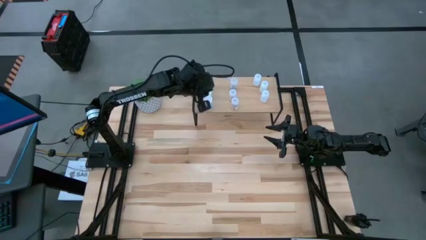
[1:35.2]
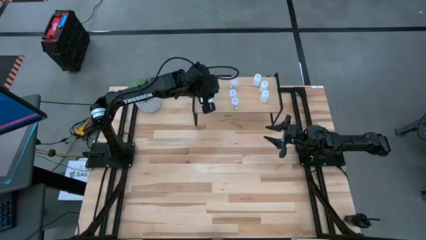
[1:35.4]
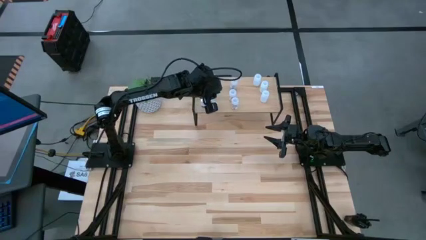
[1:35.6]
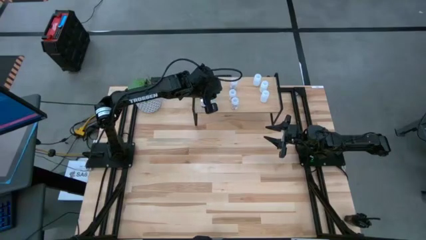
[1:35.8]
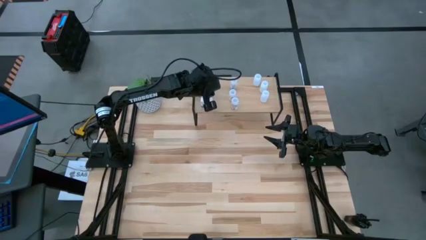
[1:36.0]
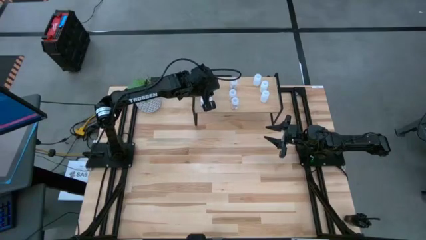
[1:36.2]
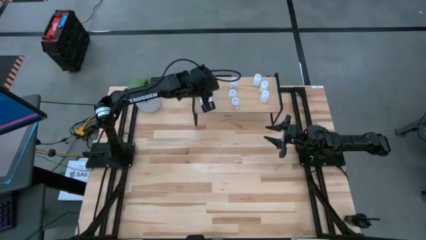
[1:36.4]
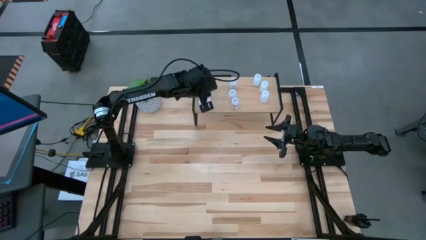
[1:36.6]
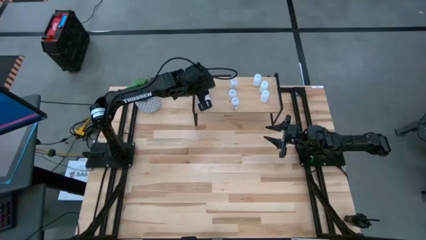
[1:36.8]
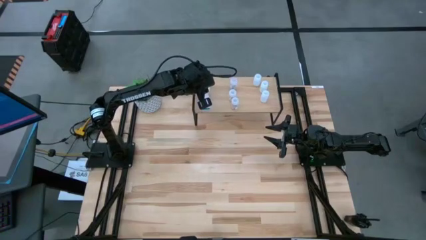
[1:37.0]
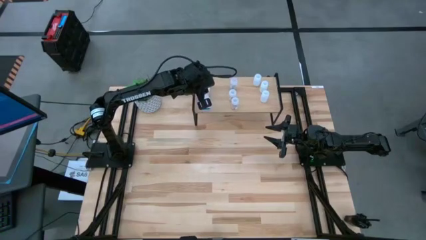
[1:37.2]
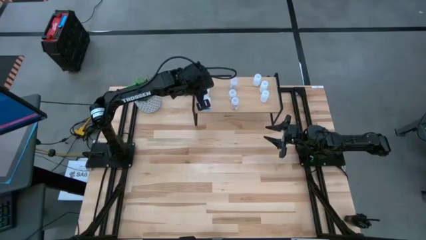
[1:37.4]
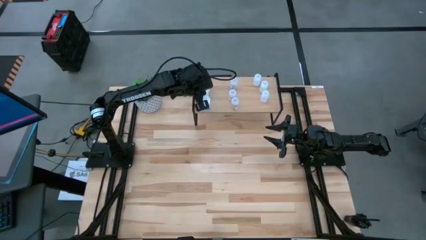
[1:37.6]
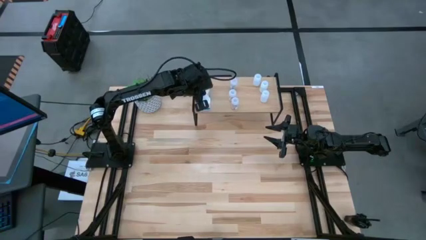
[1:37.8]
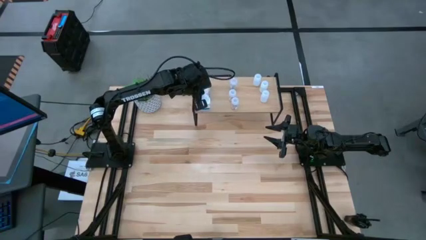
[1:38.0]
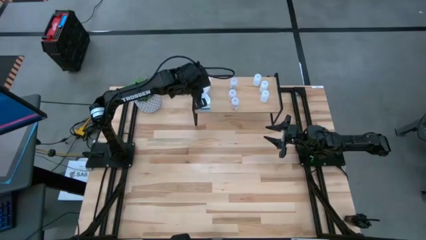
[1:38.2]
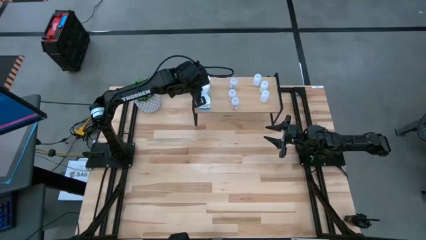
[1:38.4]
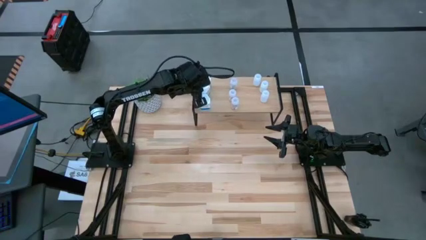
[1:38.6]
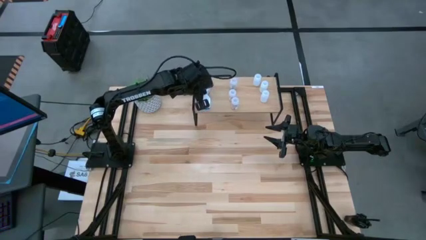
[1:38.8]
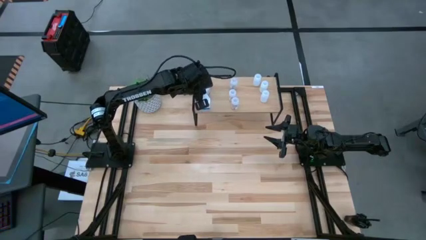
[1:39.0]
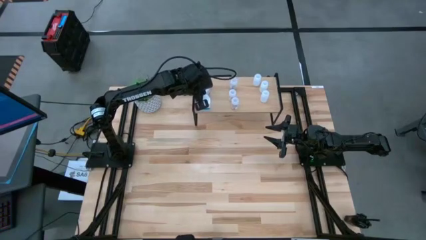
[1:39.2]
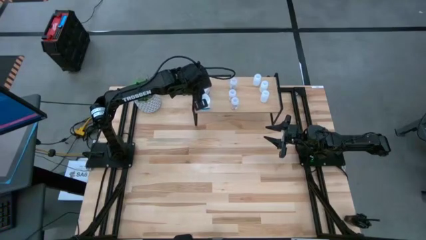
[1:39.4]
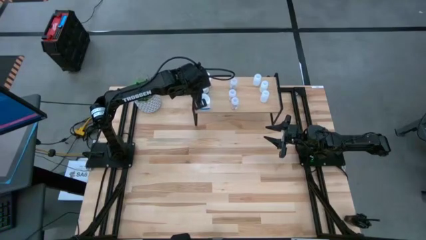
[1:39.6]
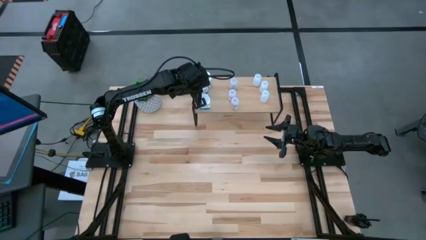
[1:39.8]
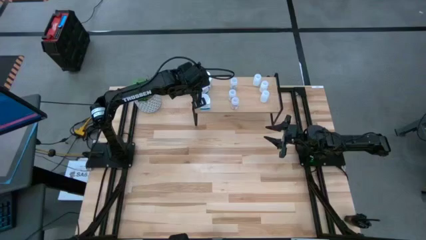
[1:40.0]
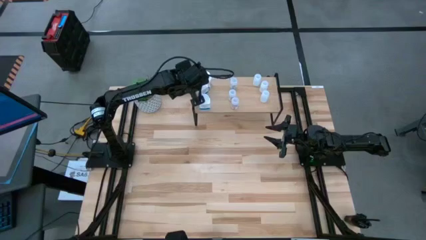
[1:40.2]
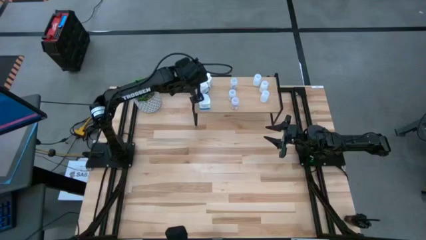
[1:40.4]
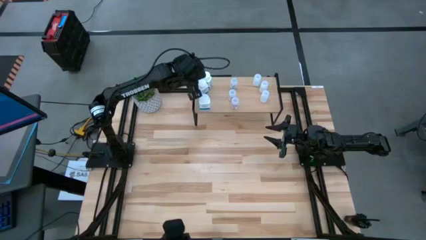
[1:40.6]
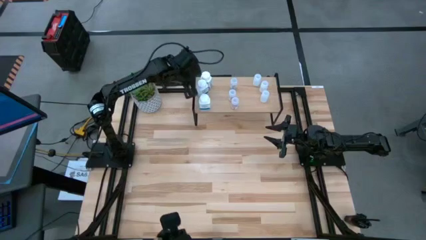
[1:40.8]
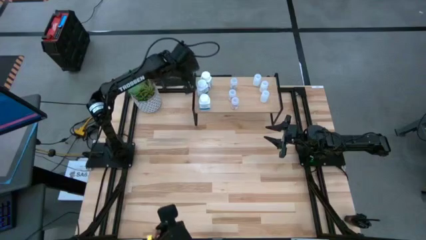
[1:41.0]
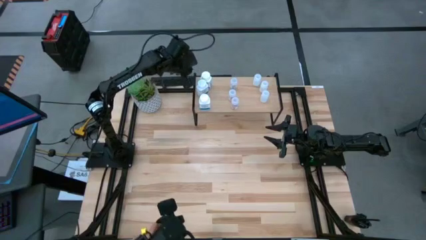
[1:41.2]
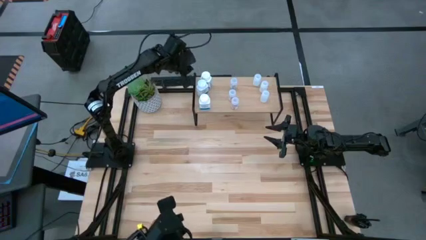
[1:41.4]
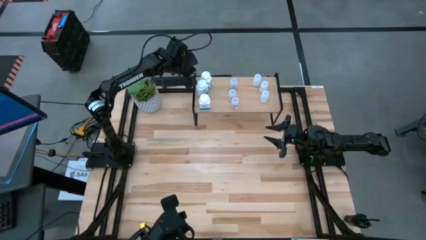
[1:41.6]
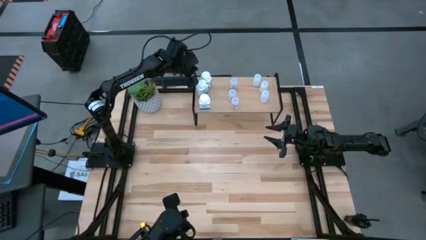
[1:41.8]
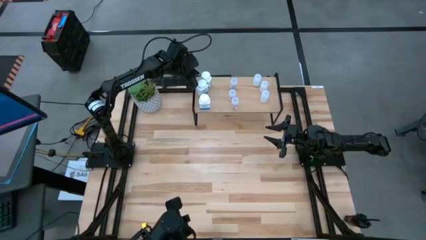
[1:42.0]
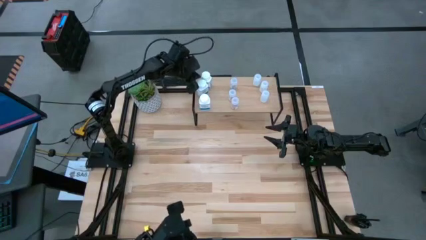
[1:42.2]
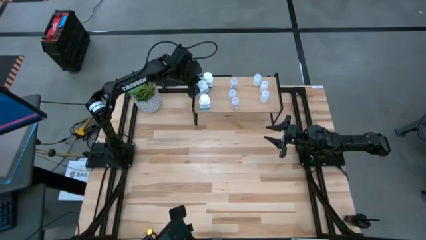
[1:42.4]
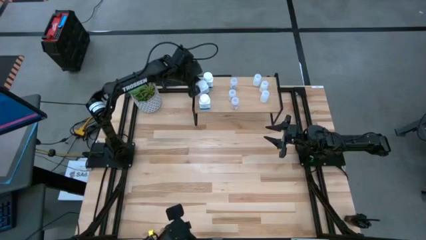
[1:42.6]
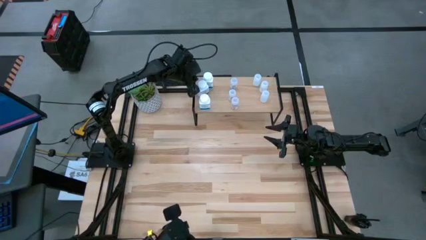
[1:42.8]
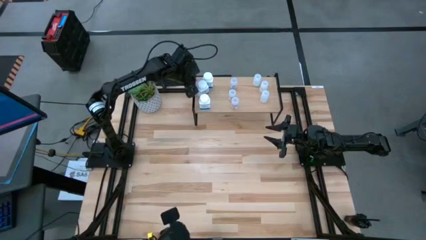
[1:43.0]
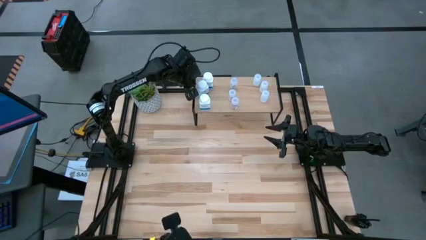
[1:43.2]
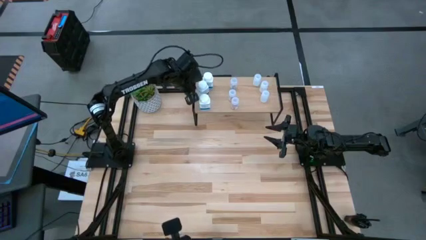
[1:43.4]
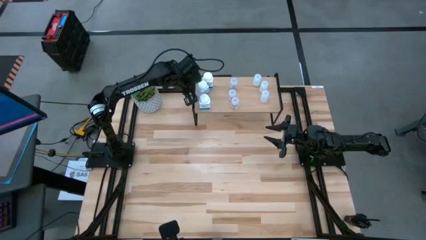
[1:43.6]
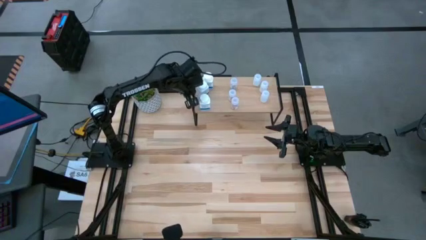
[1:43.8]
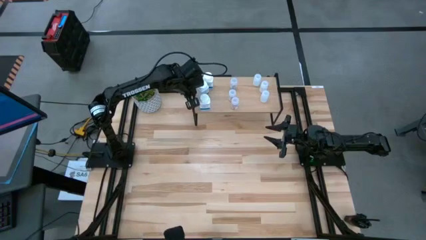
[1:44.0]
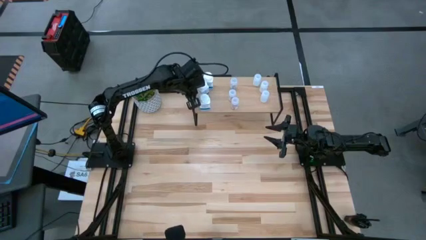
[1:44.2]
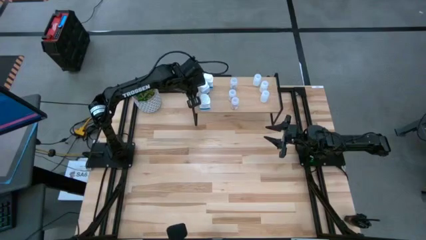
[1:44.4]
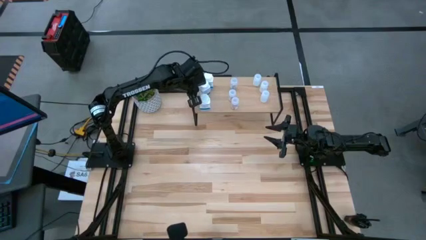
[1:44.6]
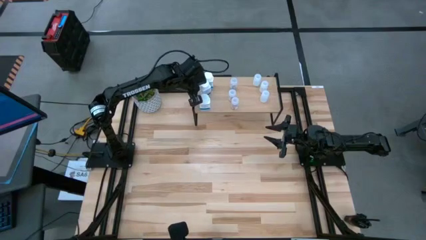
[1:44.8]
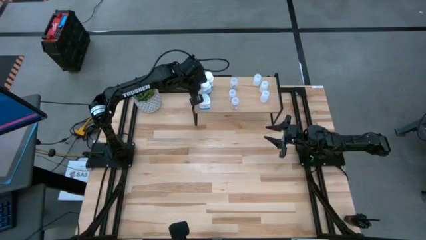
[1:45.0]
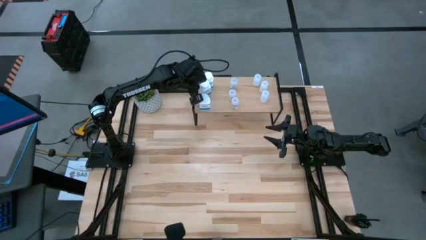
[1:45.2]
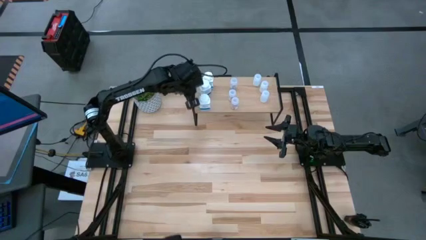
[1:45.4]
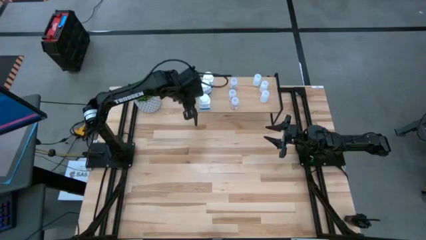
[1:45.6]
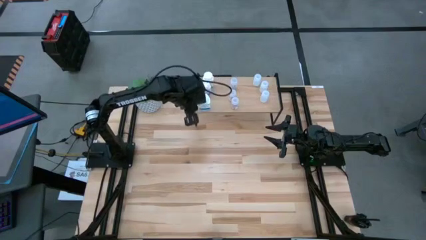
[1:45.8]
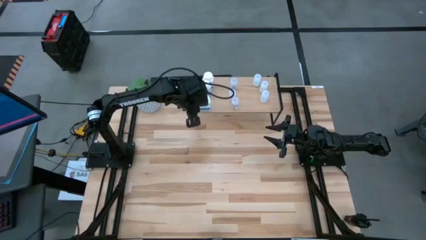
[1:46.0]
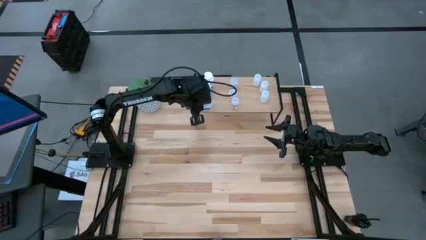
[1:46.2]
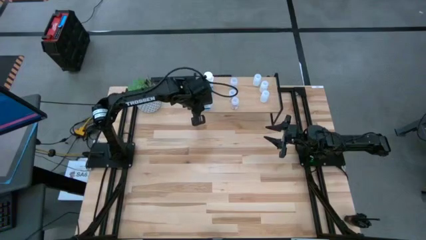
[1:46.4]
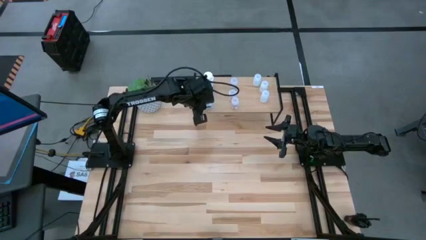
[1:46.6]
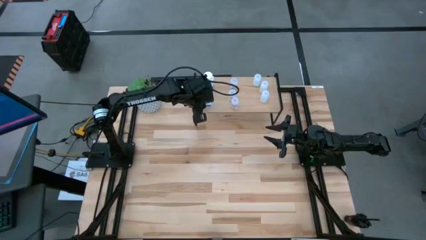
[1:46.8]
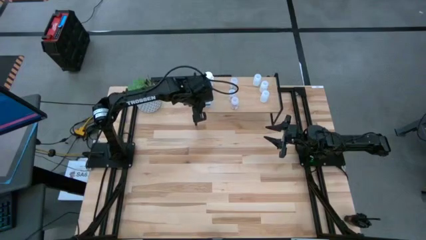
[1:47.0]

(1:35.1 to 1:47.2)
Task: Pick and place medicine bottles onto shelf by color
Adjust the big white pill bottles on the shelf

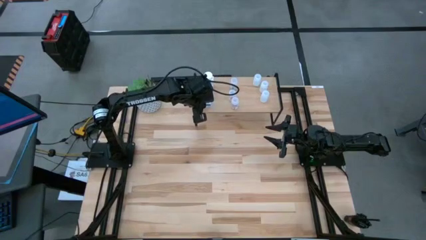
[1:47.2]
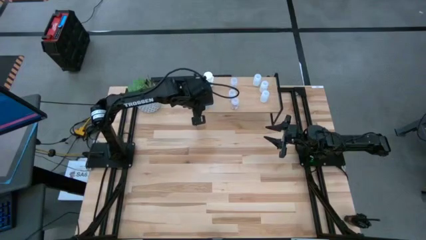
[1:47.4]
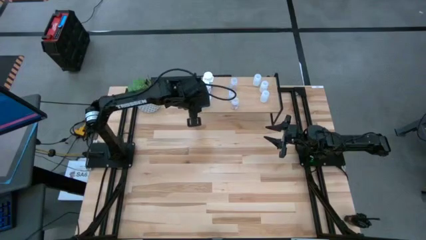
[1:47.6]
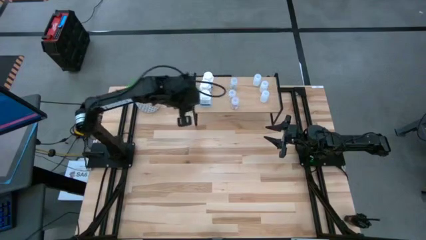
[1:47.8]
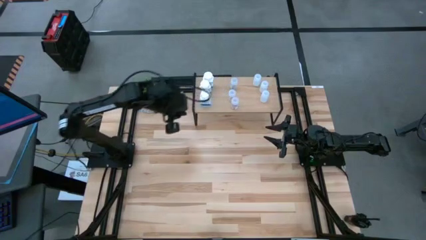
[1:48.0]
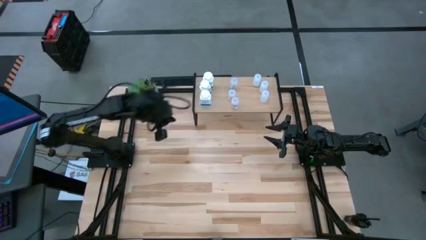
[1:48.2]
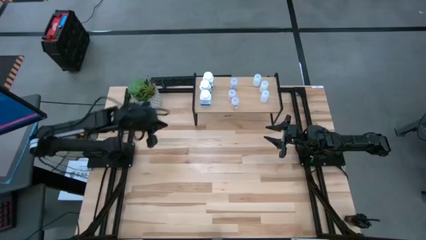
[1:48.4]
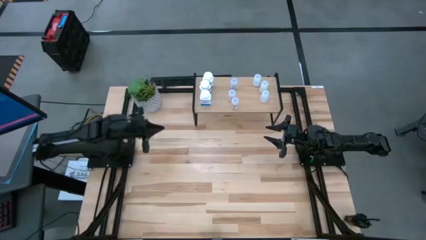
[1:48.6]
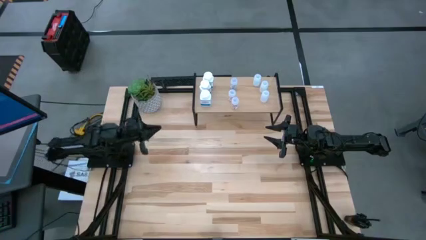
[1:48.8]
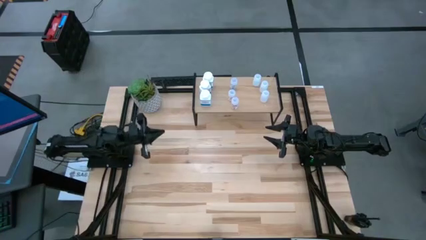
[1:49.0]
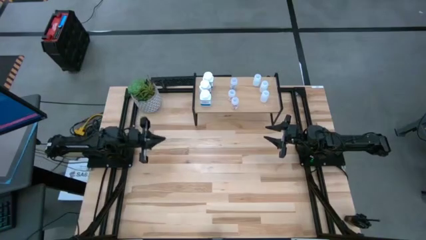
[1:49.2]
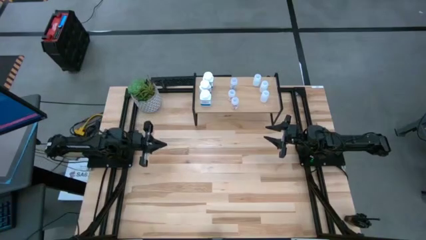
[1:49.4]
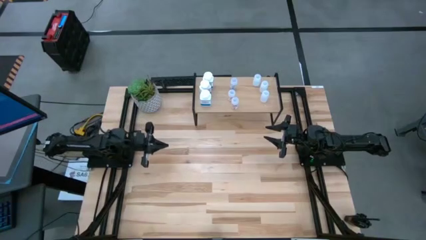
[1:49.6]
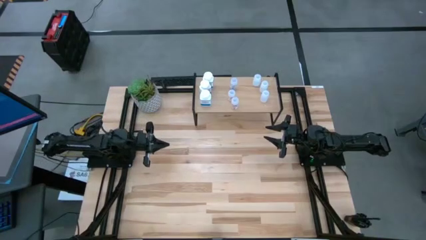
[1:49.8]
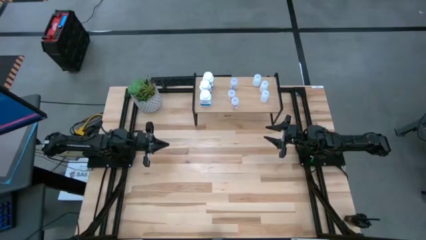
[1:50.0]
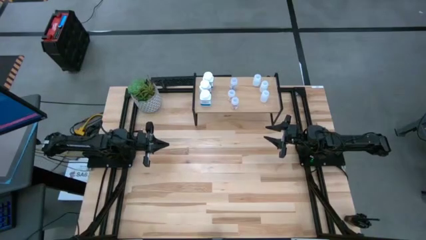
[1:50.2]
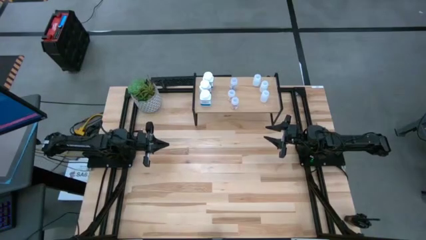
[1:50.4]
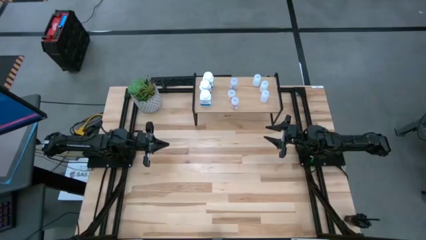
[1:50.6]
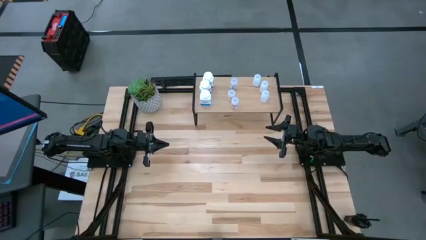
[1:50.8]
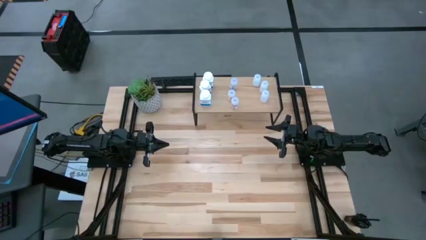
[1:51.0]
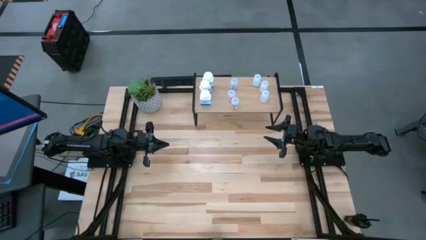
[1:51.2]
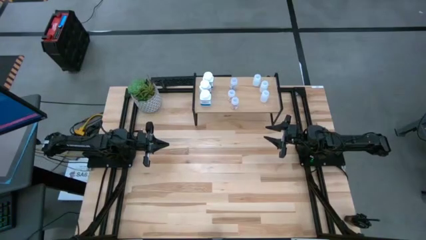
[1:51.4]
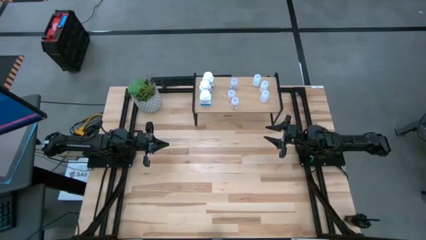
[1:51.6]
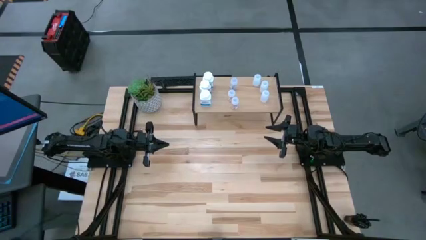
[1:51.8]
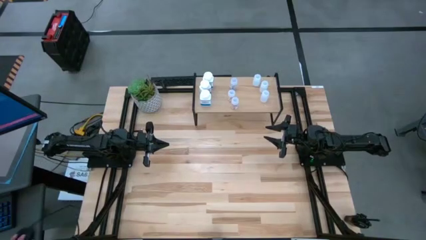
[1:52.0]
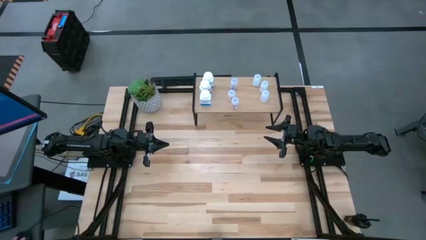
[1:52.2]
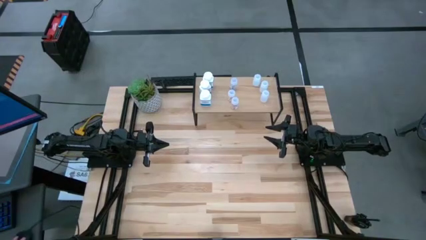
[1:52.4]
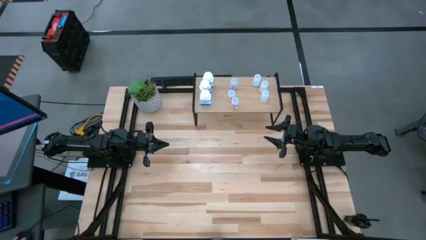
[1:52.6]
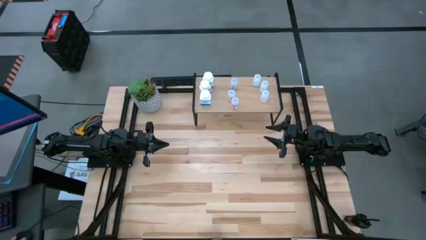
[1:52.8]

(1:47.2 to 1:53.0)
Return to Home Position
